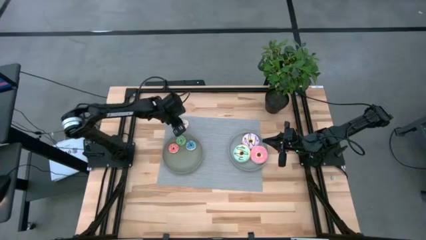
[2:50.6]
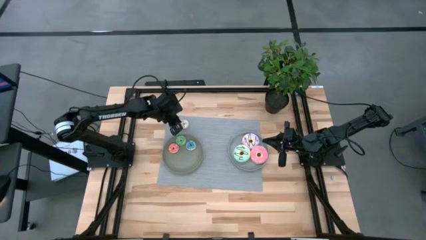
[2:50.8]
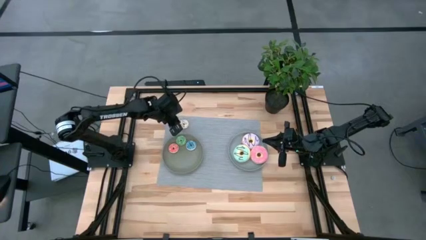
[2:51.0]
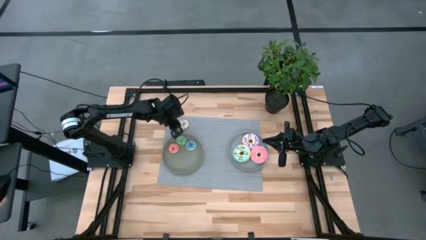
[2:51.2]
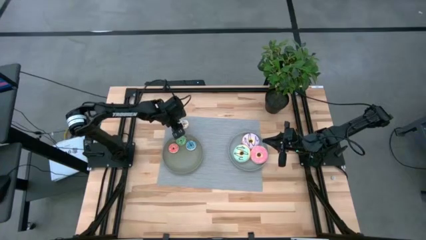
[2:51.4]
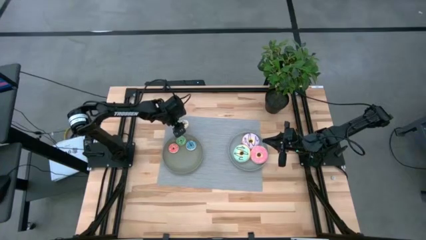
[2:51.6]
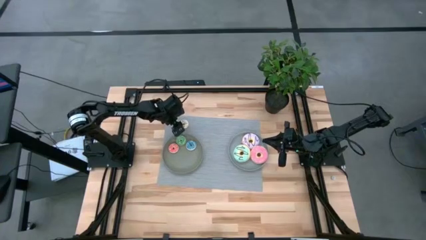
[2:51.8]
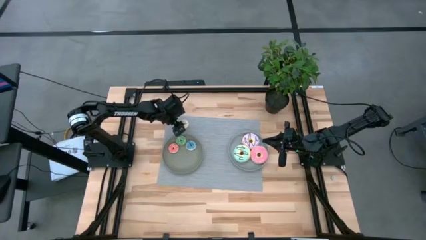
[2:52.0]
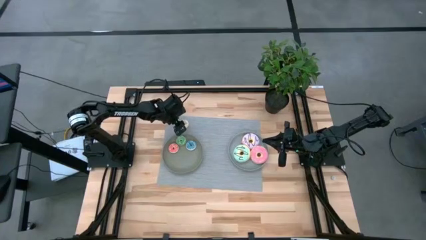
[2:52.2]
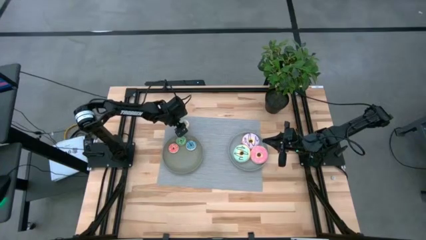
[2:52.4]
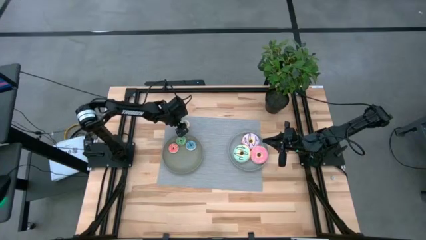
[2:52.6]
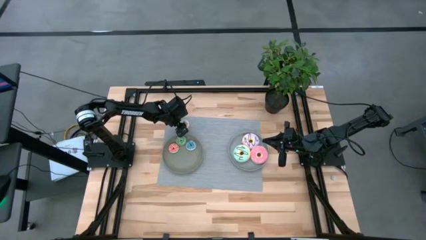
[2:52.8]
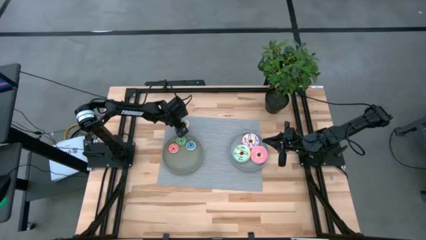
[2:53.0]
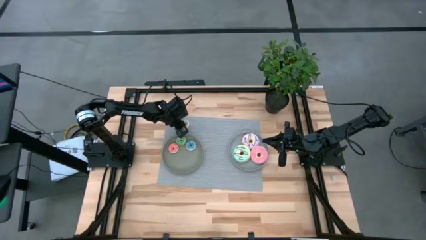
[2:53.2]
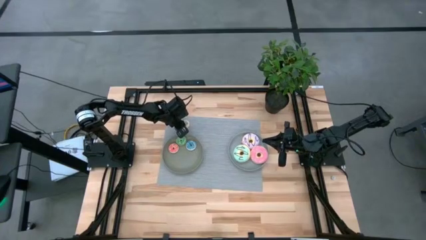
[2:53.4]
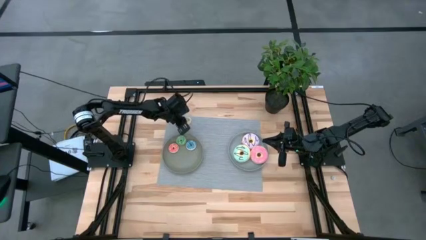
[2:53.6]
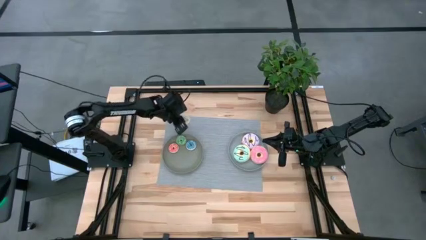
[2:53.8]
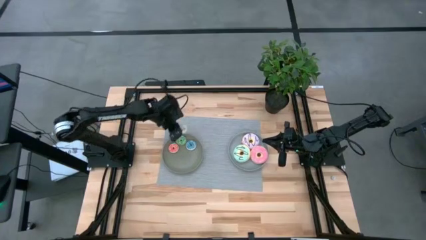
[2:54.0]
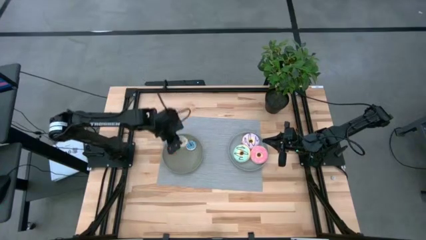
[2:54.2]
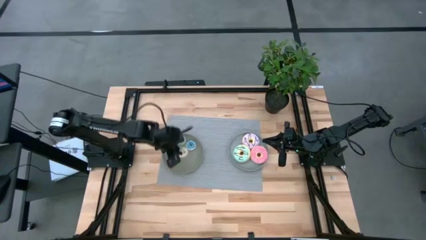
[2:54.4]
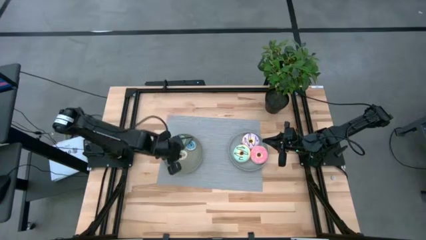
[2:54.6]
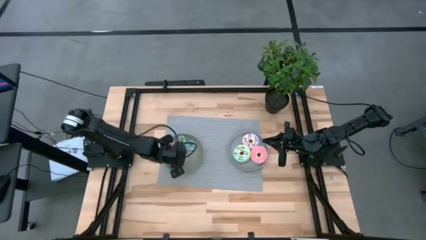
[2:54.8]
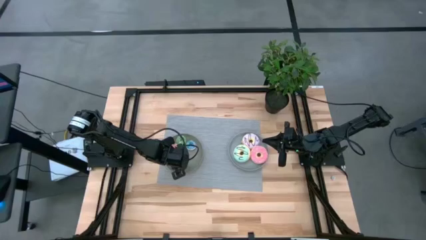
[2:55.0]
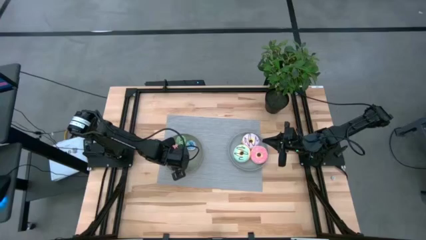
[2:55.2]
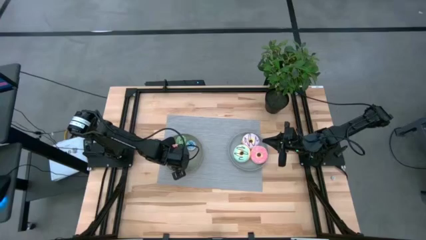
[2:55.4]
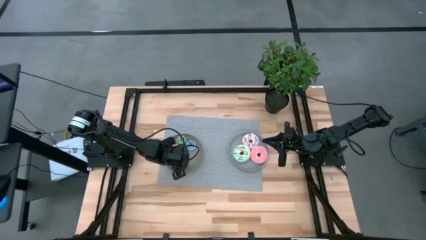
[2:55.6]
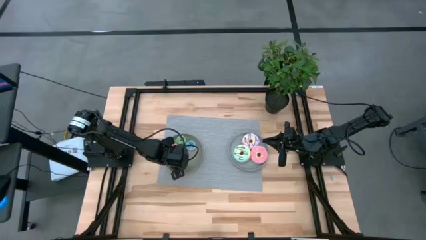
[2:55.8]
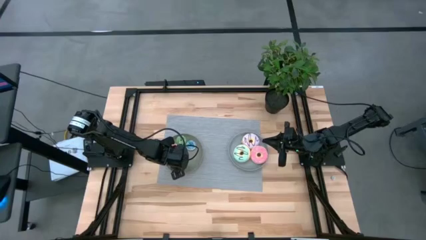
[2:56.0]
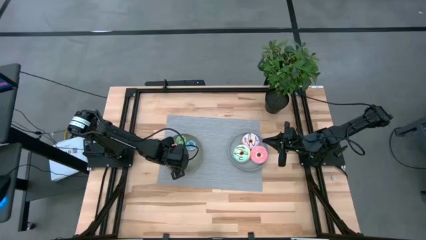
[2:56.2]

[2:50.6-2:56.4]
Task: Pick & Place donuts
Put the small white donut into the green plate

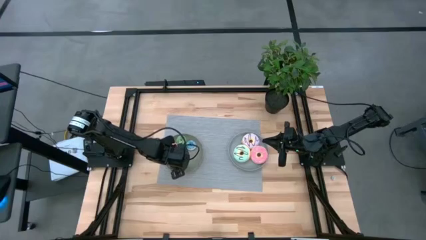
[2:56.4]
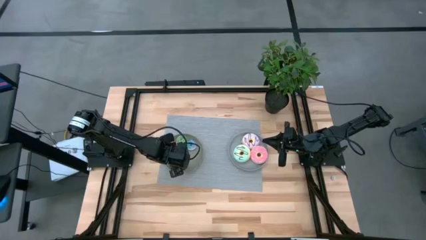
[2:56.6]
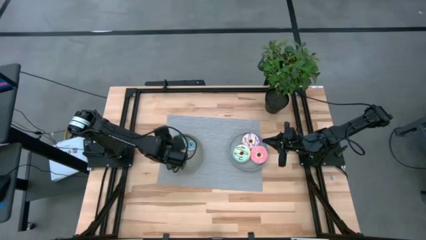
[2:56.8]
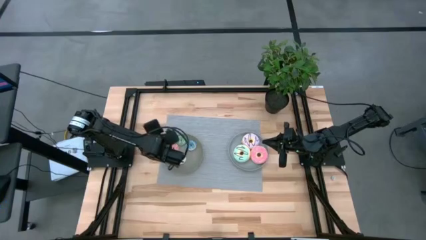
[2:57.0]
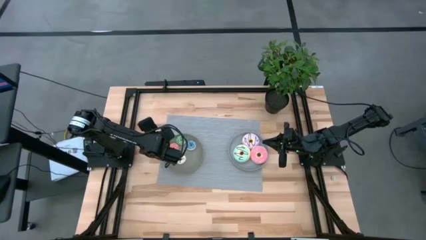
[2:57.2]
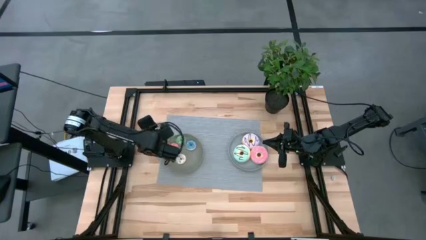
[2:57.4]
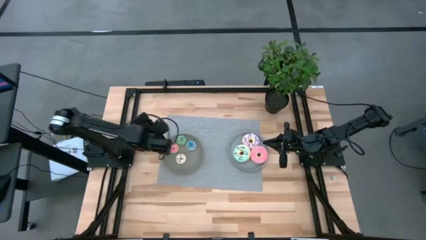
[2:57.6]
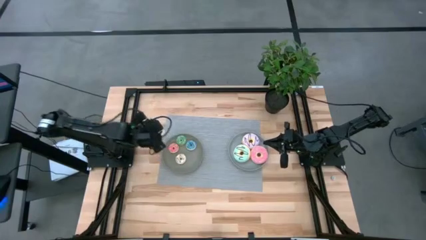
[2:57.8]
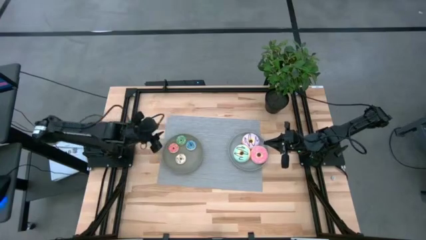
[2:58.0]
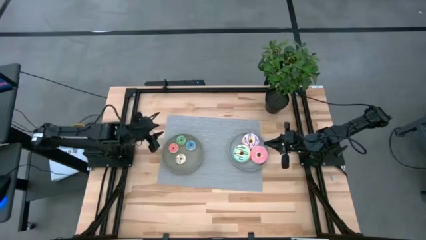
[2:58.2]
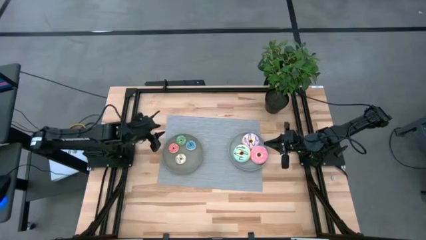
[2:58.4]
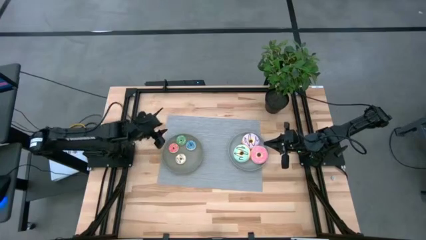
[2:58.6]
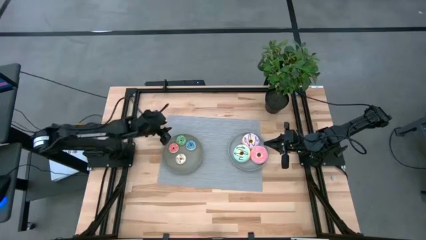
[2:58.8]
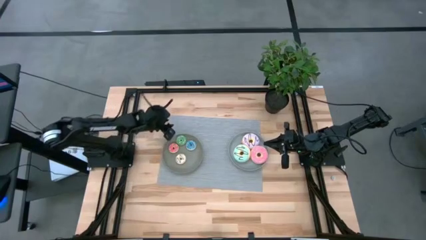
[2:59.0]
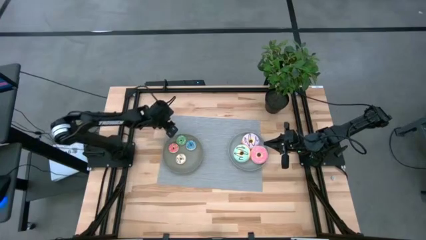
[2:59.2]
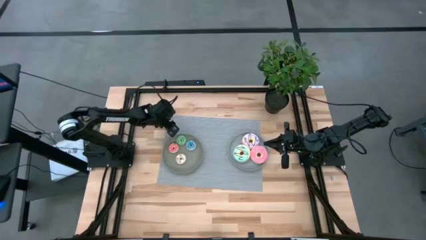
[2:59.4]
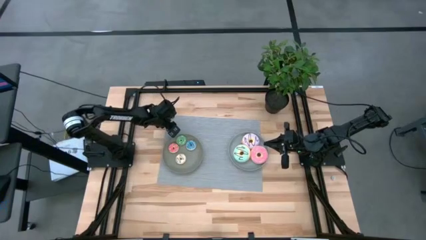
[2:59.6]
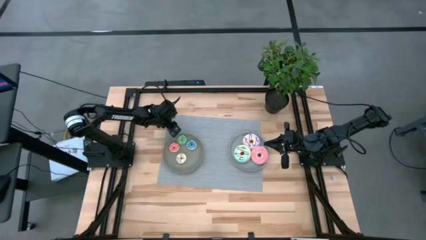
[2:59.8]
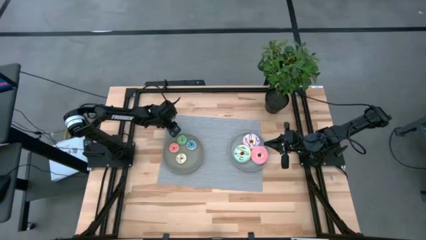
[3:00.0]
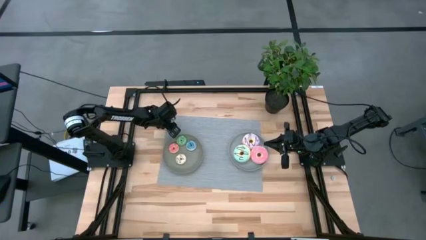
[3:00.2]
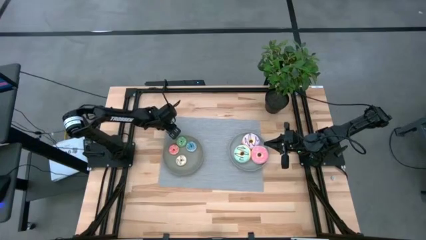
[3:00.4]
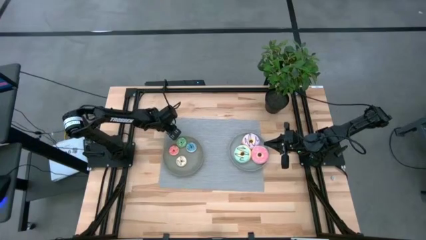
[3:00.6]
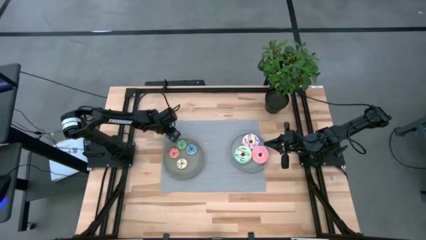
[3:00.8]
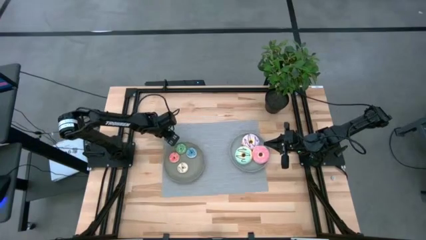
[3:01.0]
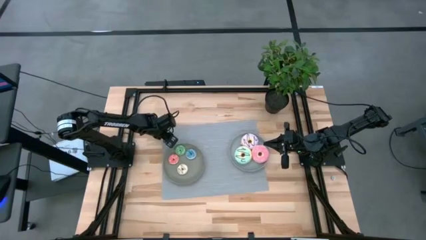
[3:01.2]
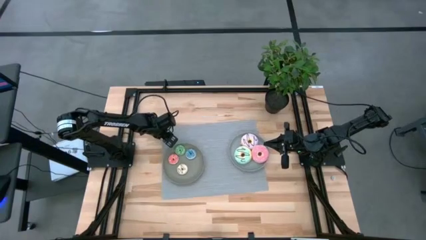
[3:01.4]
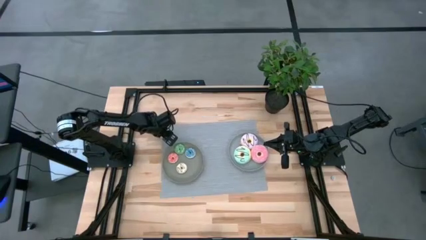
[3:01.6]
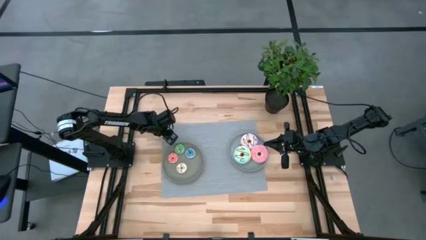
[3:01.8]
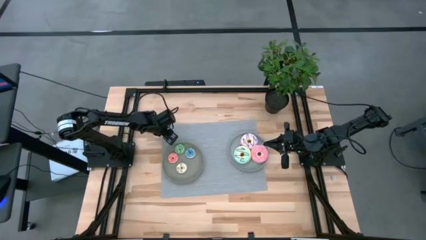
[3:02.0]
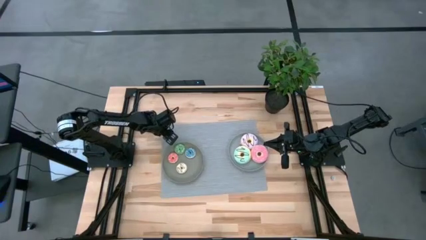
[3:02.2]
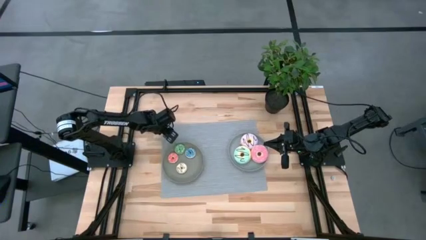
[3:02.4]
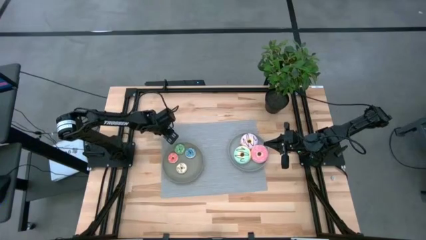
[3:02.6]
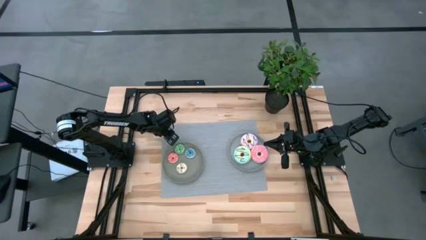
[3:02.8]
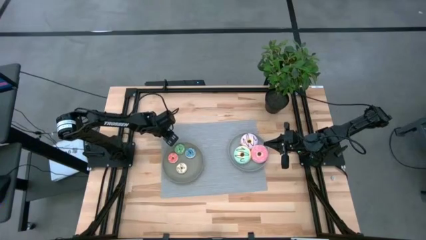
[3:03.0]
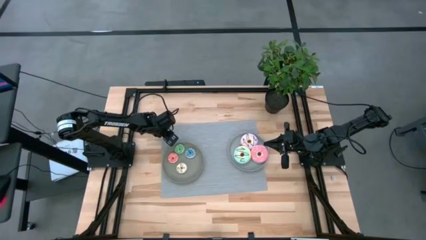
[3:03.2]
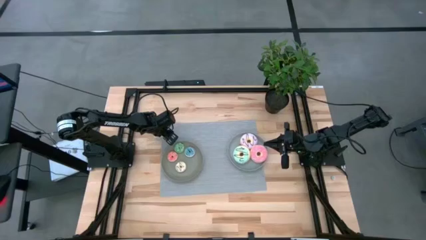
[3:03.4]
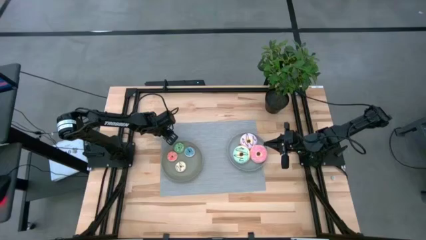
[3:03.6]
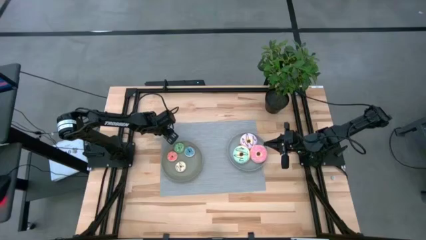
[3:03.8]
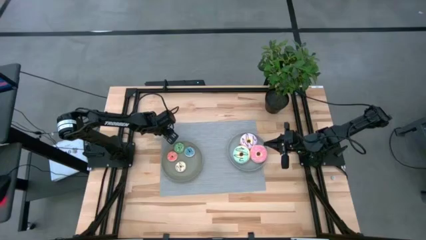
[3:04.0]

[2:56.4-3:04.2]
Adjust the gray placemat

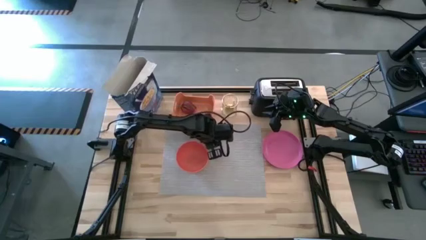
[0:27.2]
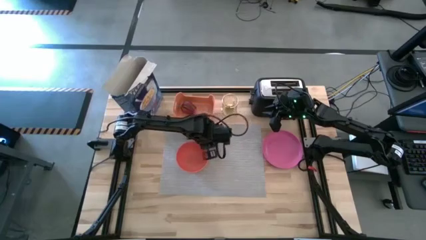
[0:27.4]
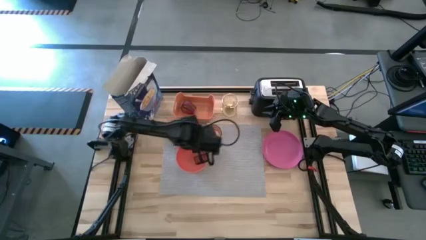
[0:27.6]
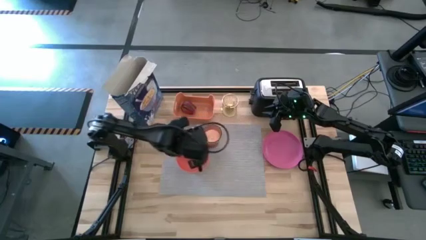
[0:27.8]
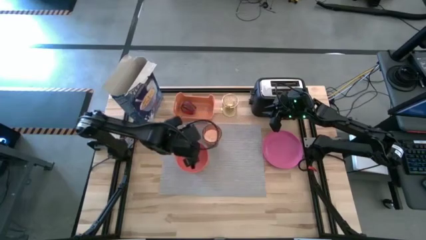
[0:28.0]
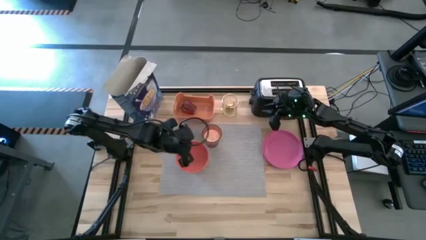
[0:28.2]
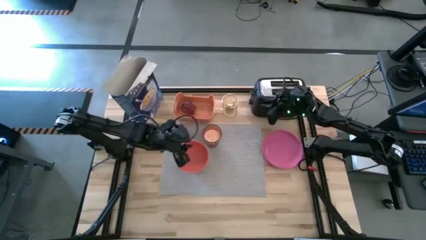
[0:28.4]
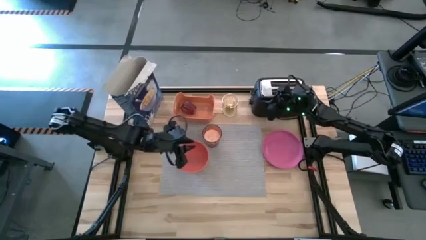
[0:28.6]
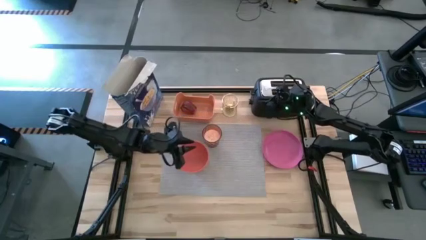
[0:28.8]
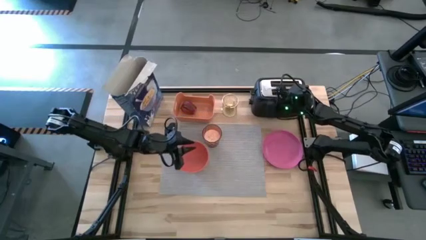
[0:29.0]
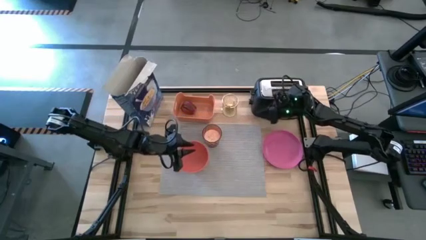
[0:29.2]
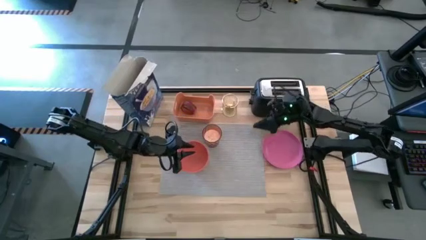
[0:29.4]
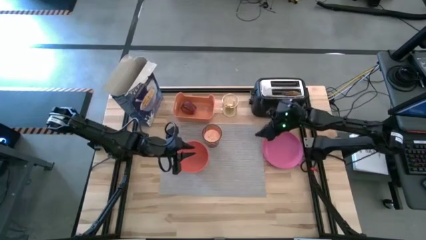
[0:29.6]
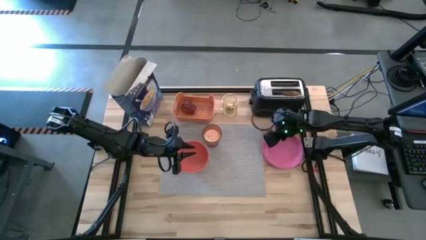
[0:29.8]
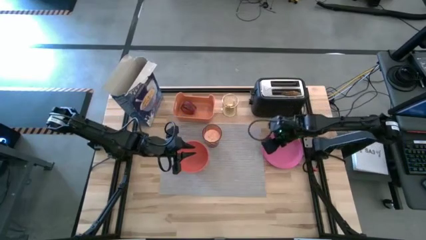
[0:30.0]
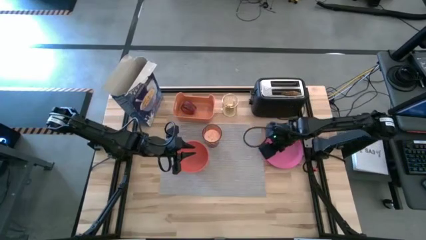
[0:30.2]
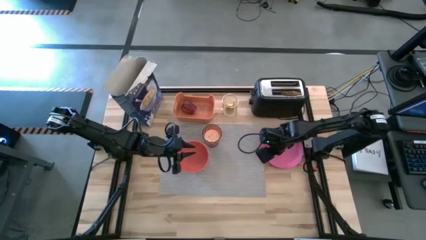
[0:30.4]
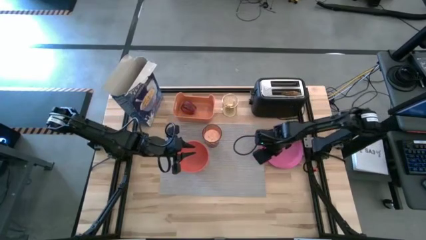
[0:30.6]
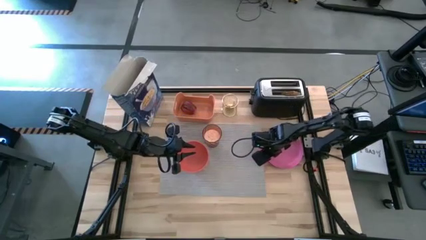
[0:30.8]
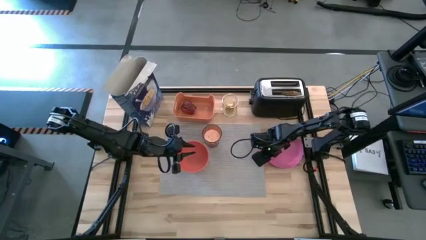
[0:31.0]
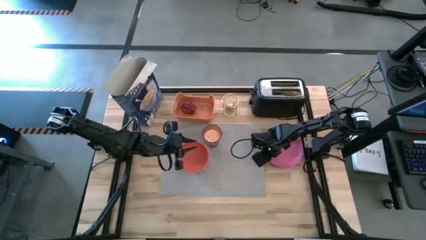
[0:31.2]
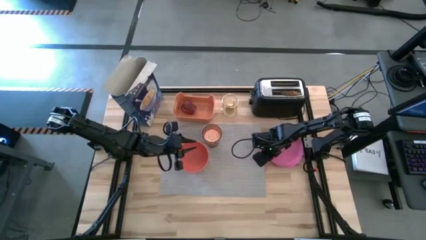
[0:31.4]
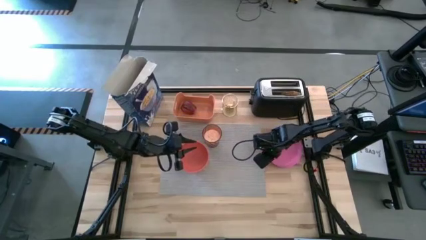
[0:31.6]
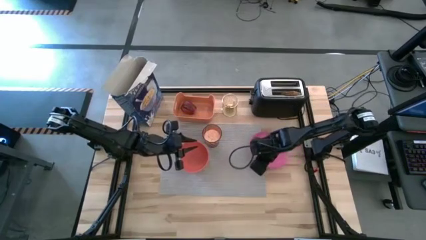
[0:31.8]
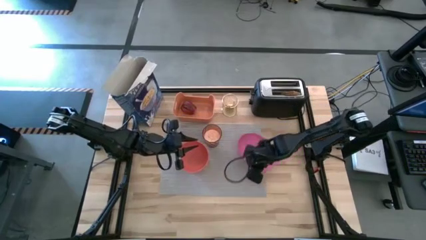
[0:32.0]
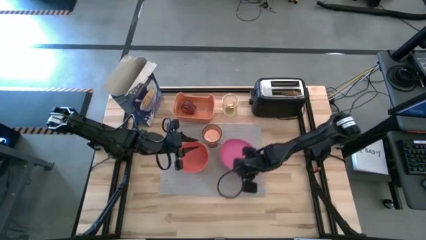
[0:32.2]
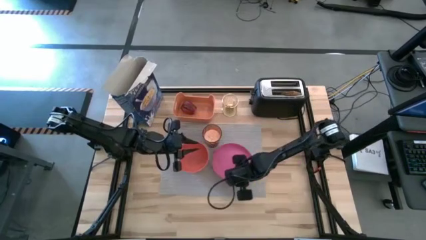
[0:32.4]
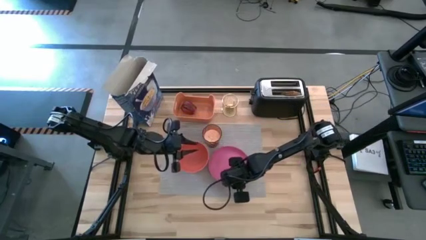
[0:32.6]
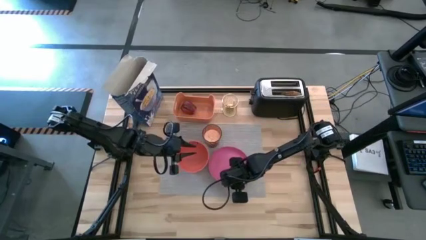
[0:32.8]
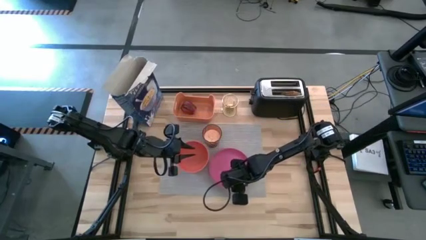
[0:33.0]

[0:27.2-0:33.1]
Task: Arrange a breakfast setting
Put the pink plate on the grey tablemat to the right of the the orange bowl
